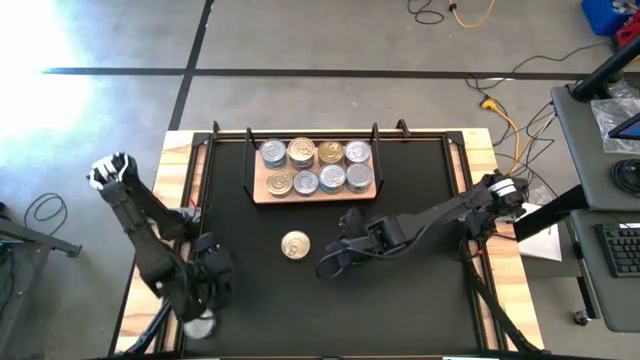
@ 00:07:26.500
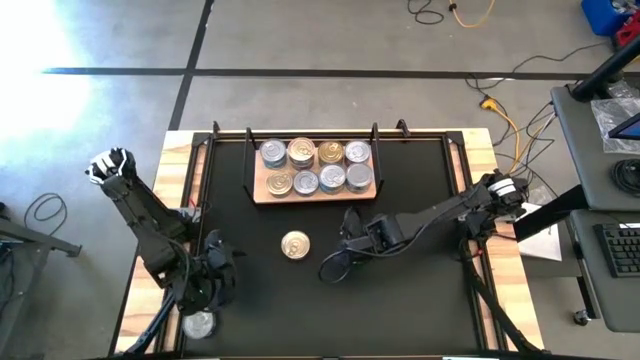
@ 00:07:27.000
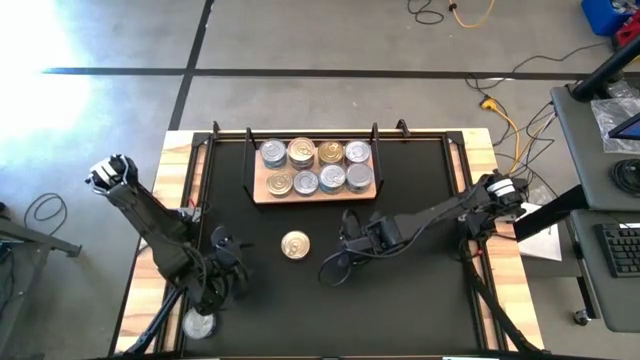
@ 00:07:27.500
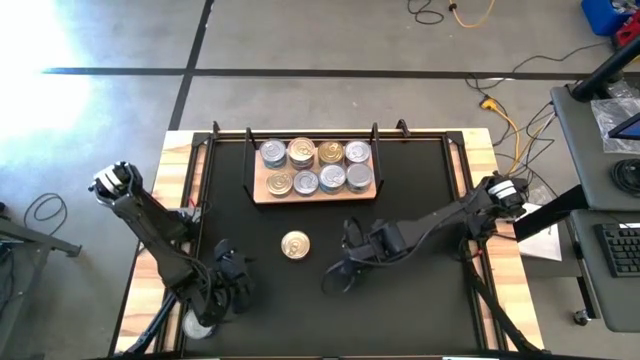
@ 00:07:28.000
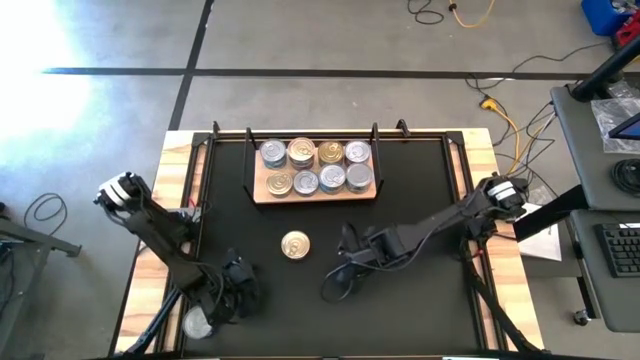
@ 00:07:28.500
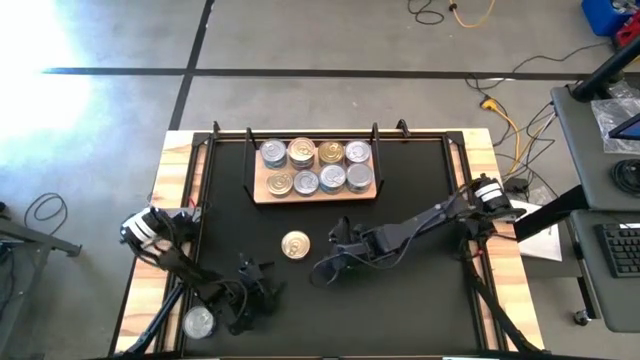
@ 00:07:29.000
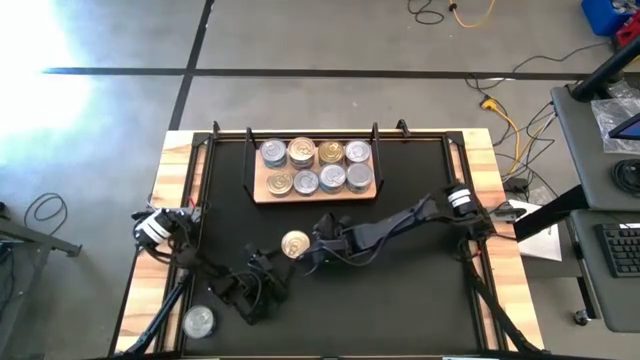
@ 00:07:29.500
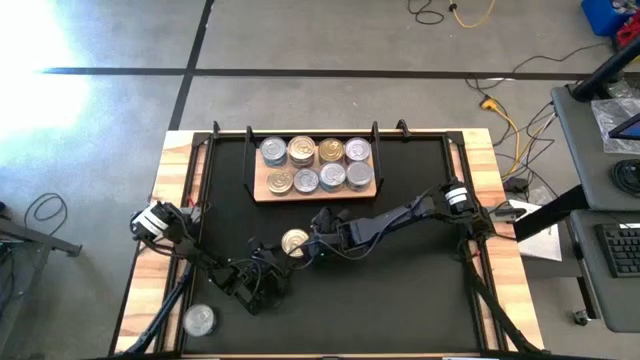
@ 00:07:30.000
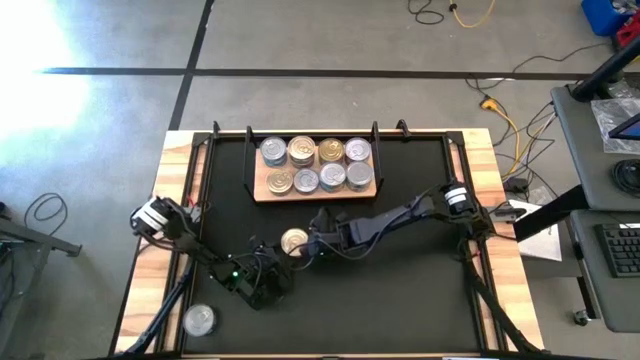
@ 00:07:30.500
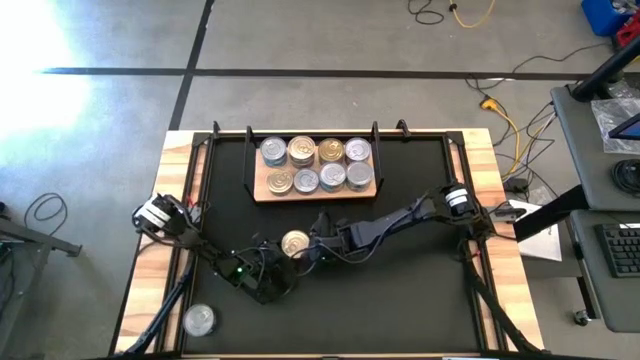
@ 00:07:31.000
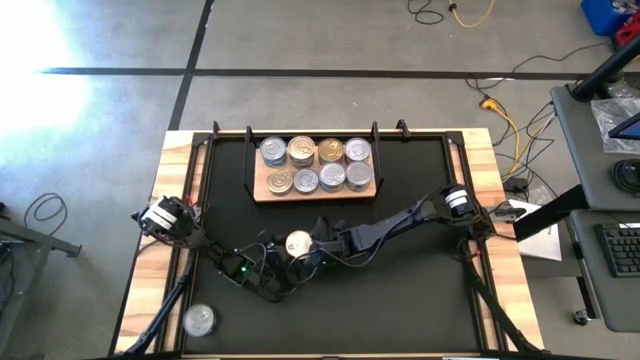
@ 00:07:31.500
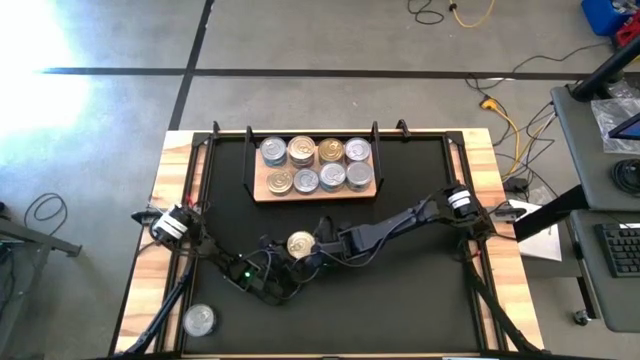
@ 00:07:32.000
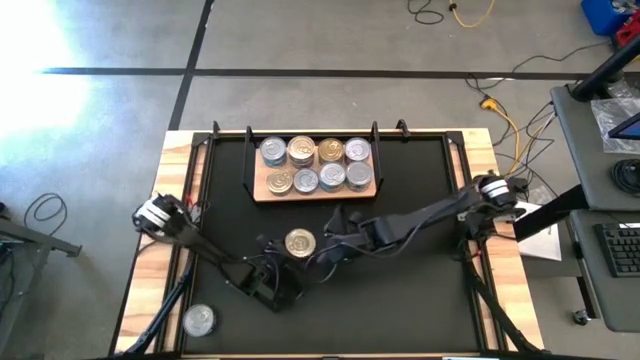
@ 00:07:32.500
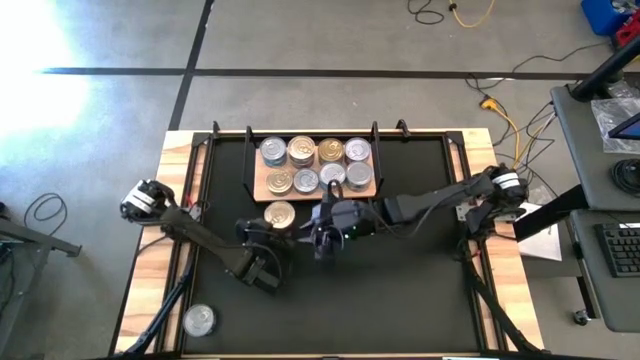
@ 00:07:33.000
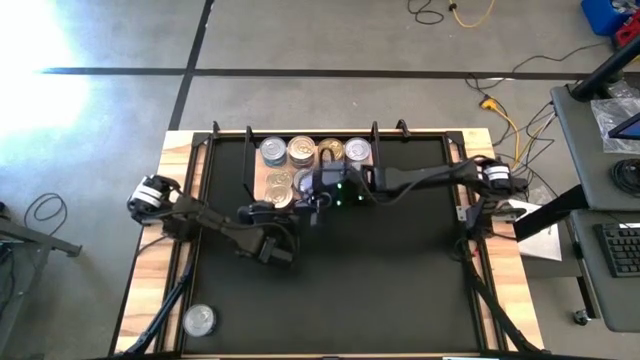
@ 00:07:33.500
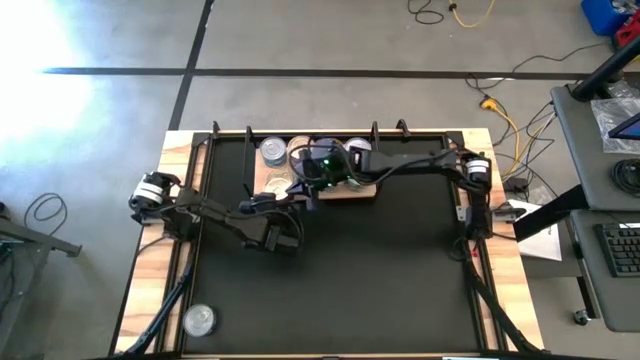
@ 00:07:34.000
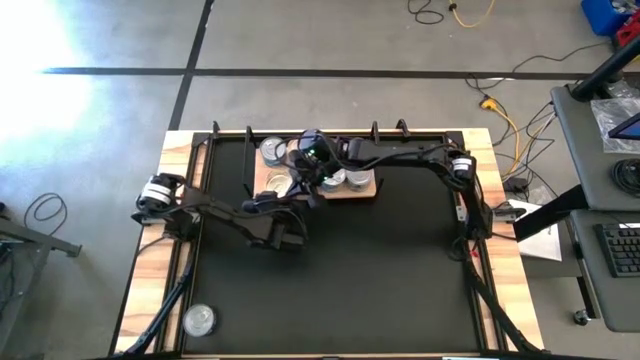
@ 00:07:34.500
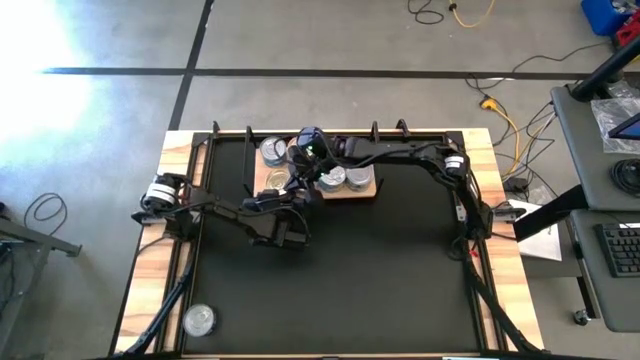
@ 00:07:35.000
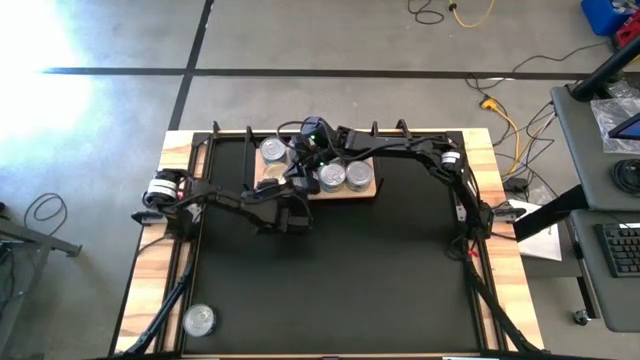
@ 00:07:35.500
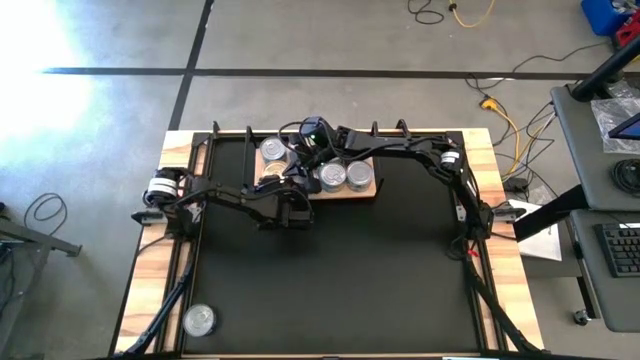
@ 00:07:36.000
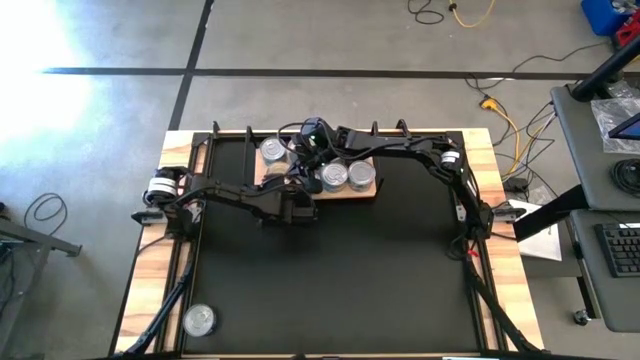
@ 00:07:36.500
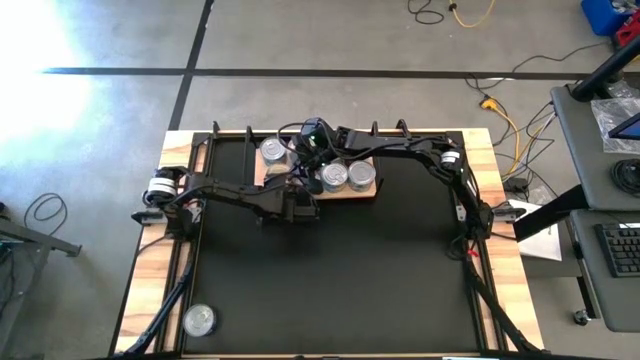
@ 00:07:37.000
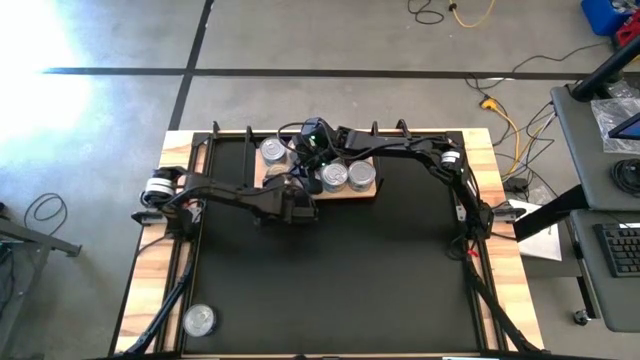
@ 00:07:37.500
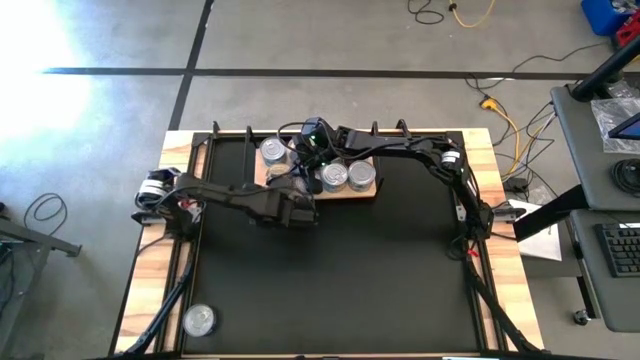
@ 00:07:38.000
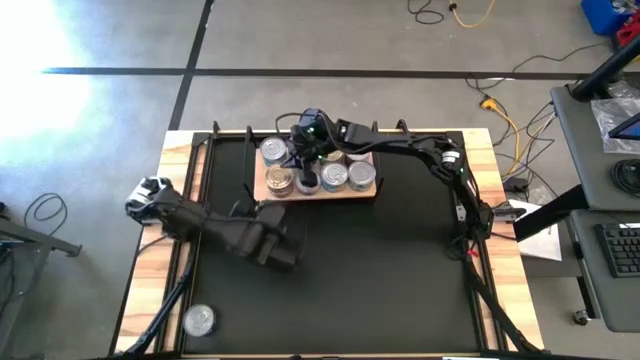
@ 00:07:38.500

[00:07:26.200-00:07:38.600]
Task: Stack canned seafood by type on shelf
Stack the blue-pink tuna can on top of the other blue-pink tuna can on the shelf
